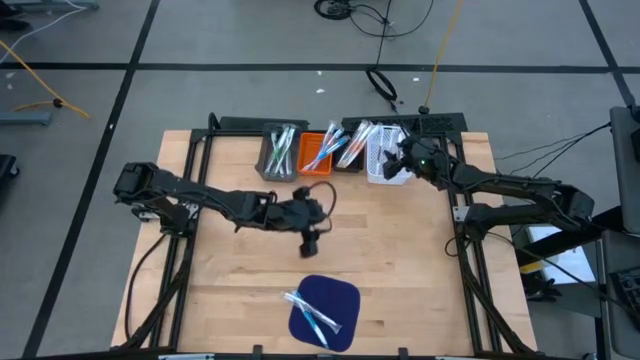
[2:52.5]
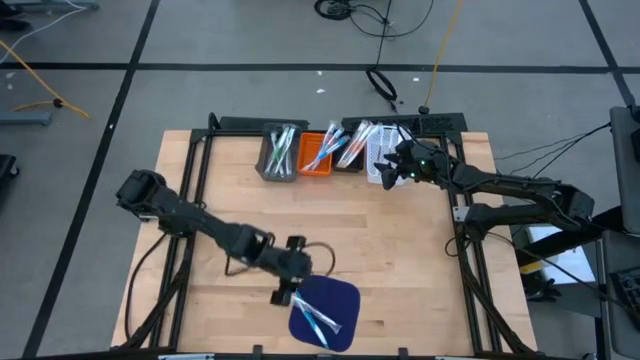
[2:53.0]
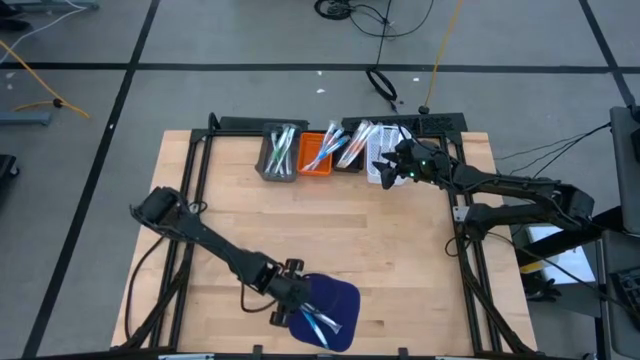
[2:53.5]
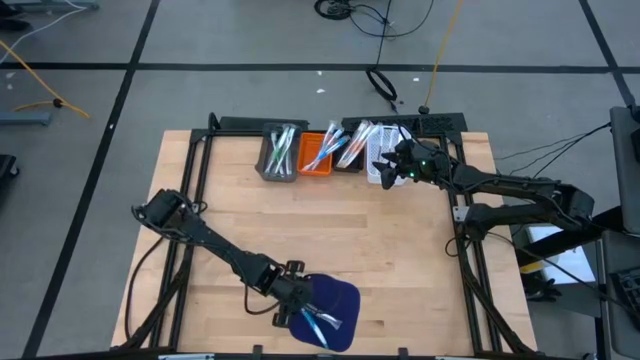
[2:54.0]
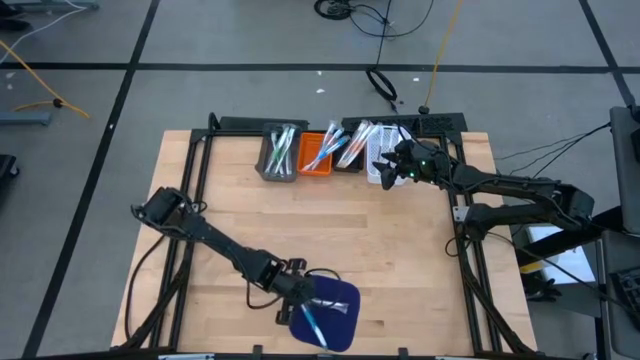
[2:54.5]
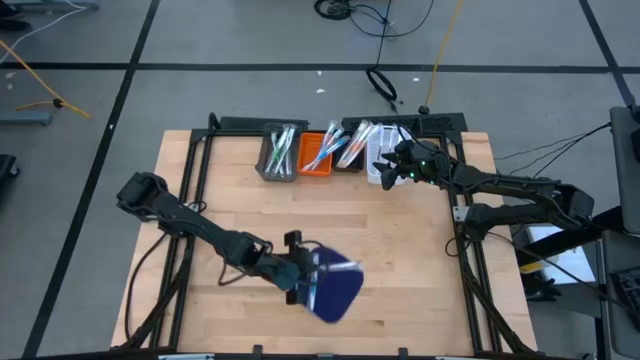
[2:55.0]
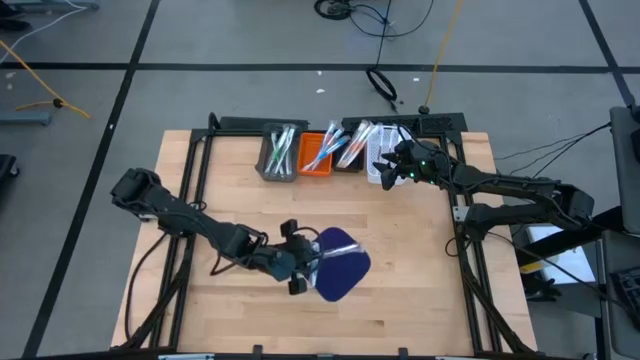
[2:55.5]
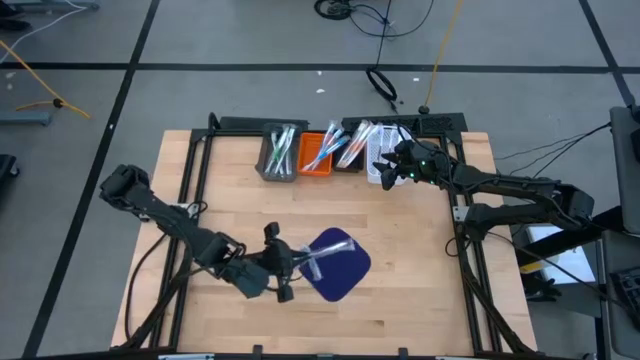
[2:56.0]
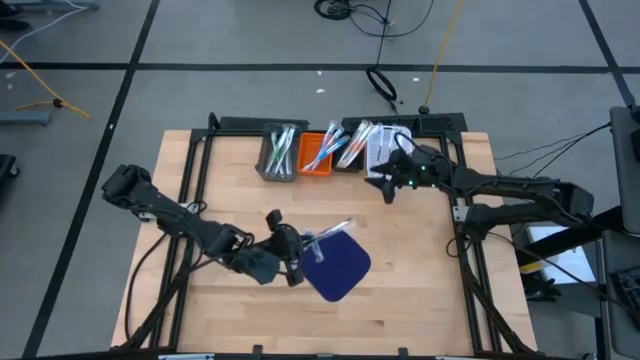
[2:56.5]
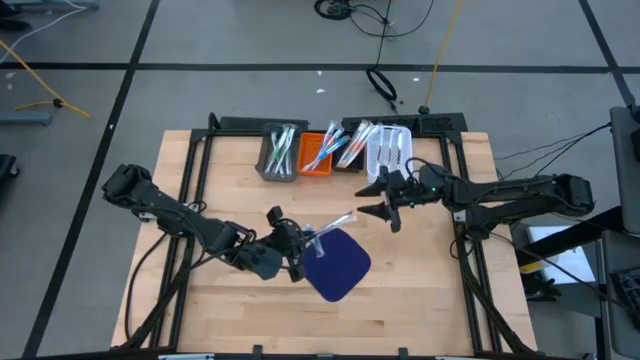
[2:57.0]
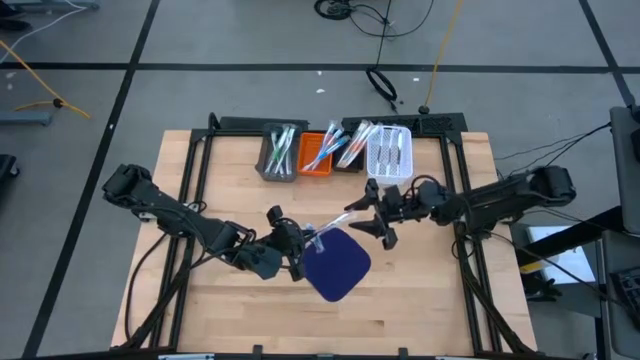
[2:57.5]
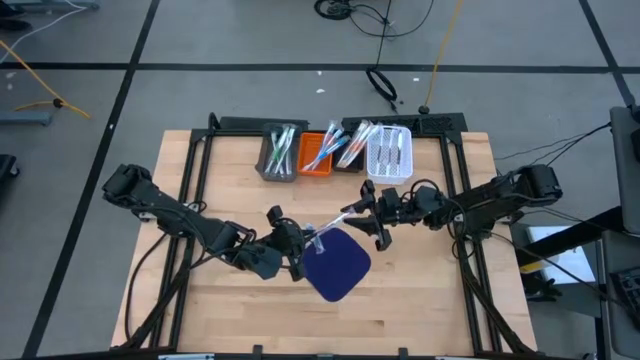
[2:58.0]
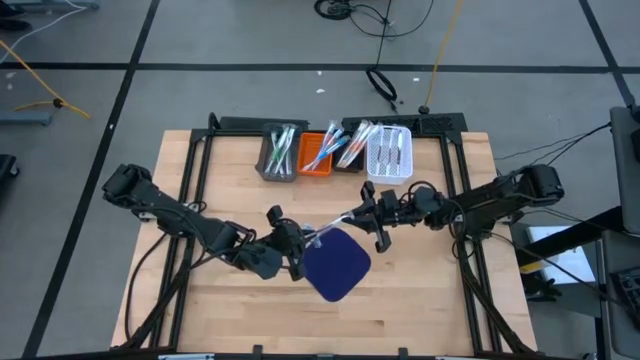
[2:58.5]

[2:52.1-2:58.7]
Task: Pick & Place Toothbrushes
Put the purple toothbrush into the white bin

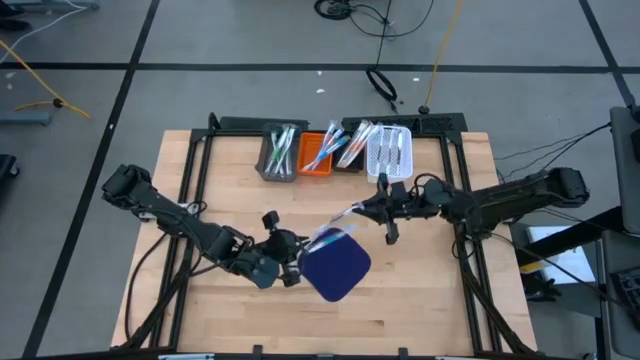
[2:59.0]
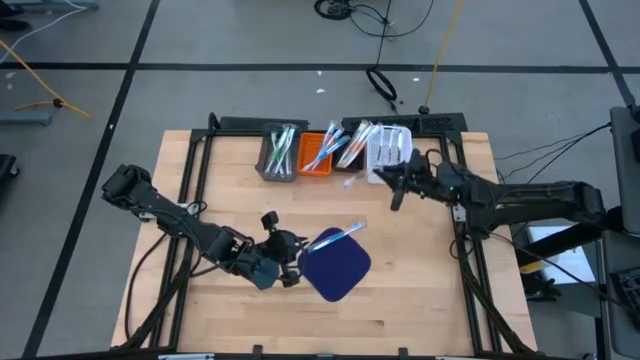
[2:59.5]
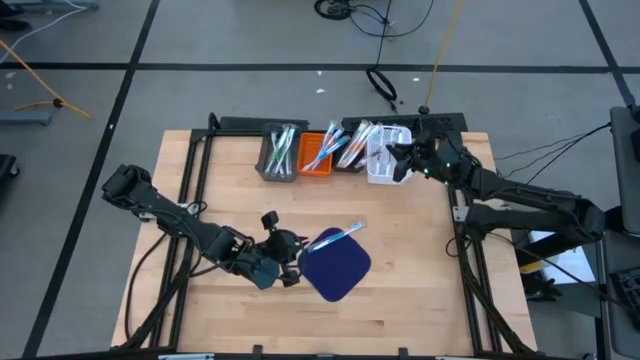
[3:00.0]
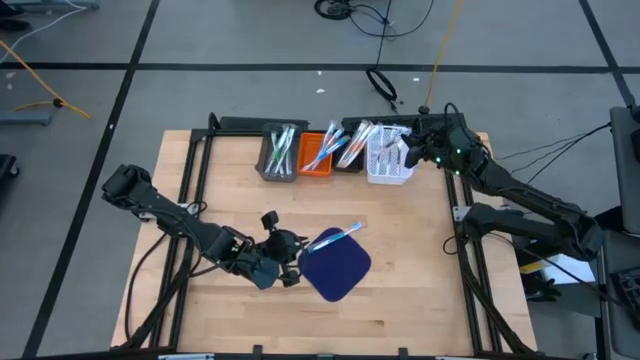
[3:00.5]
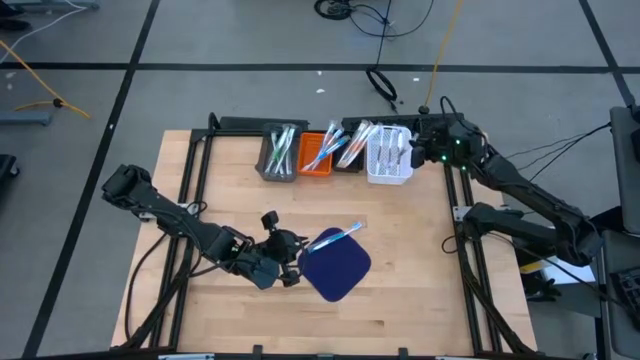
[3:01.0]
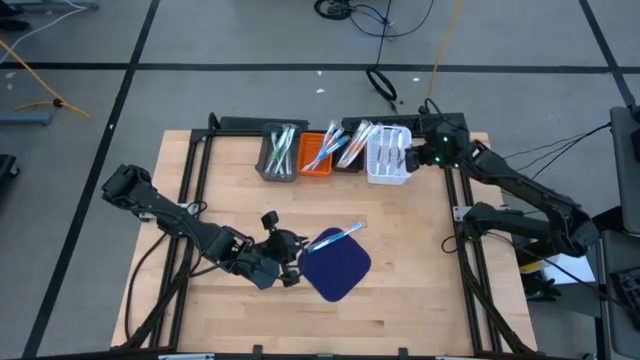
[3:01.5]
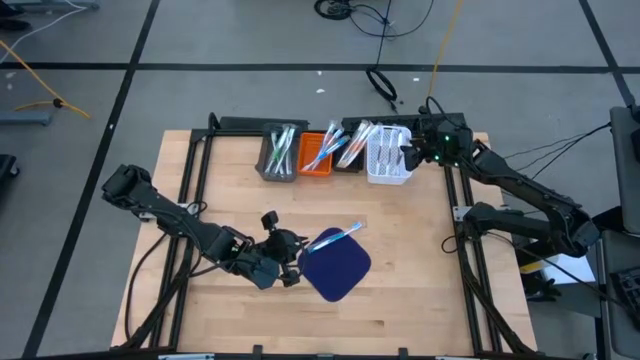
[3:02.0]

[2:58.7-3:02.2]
Put the purple toothbrush into the white bin

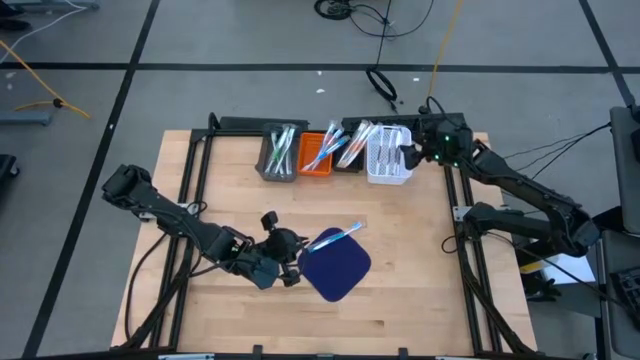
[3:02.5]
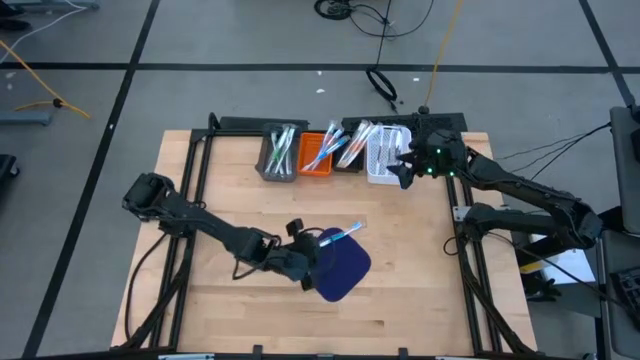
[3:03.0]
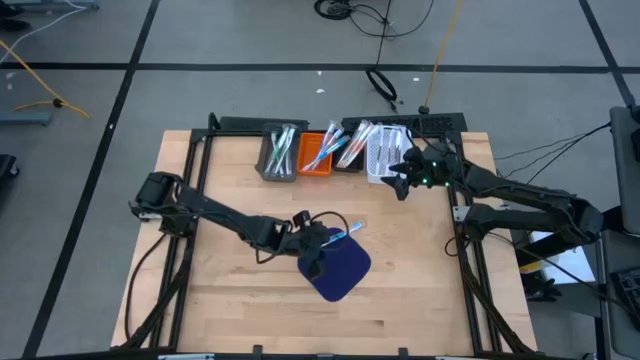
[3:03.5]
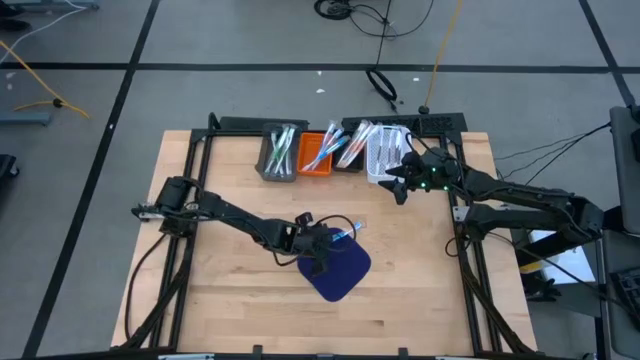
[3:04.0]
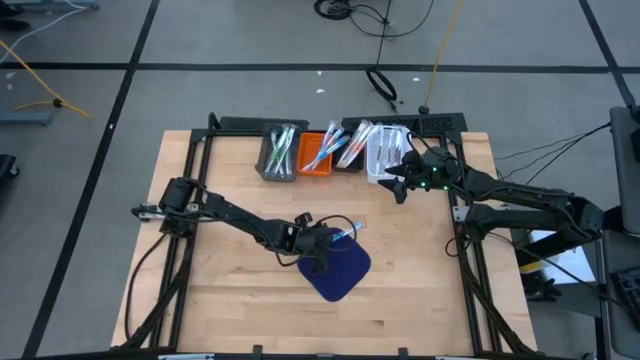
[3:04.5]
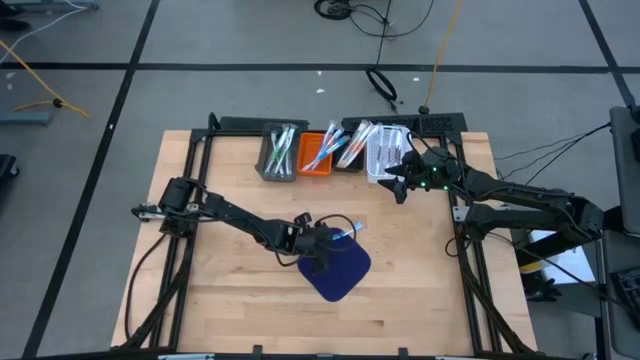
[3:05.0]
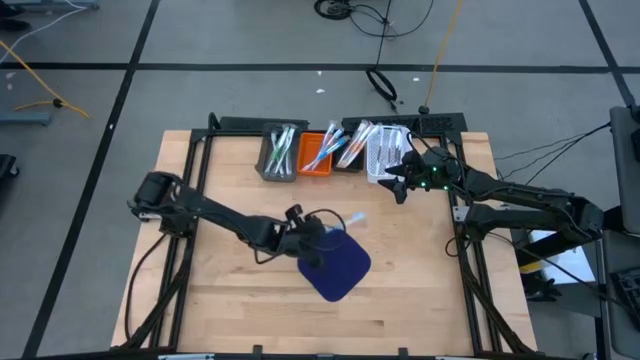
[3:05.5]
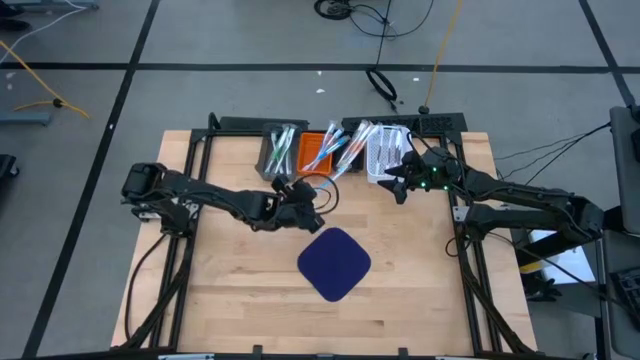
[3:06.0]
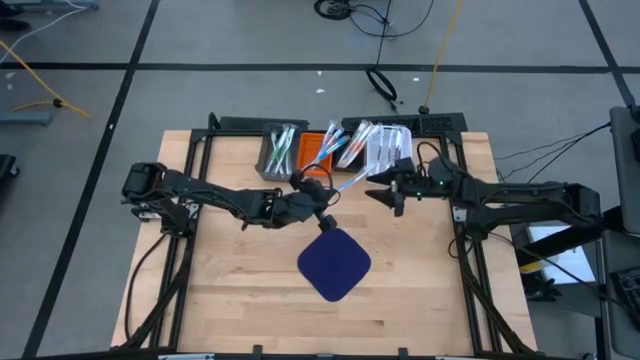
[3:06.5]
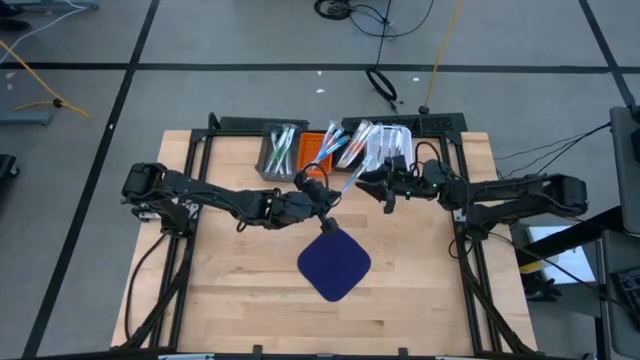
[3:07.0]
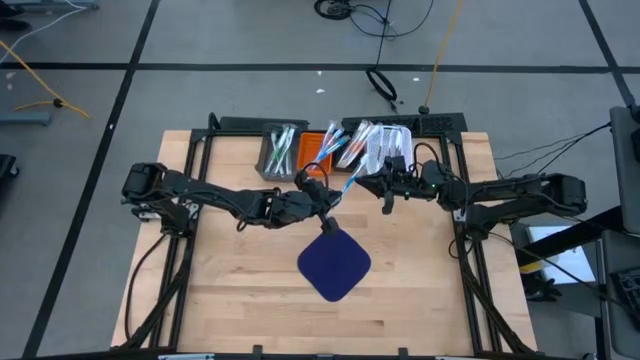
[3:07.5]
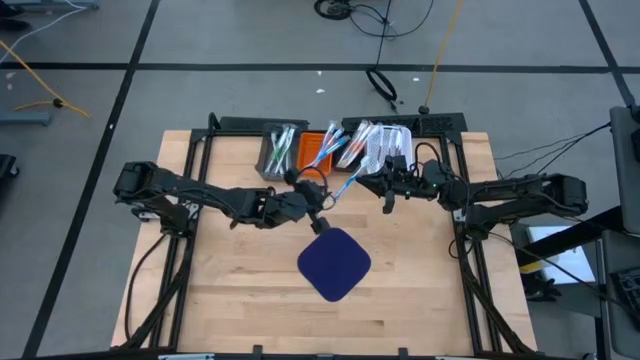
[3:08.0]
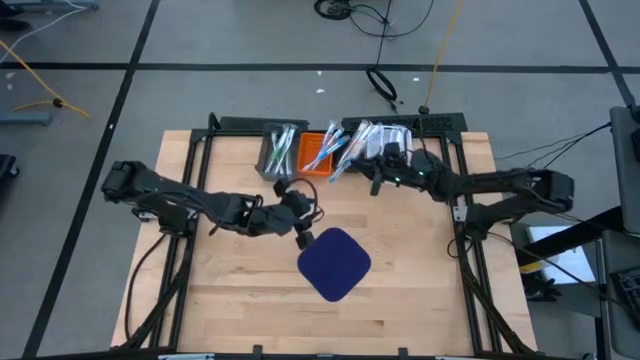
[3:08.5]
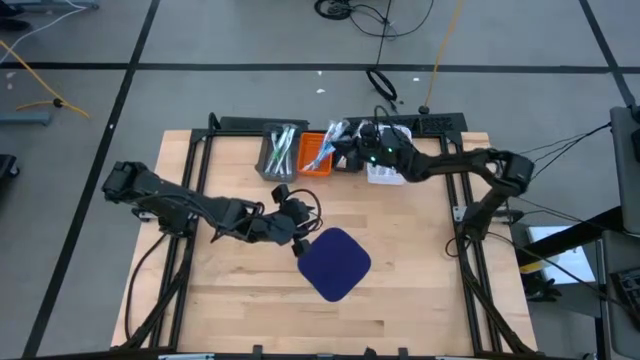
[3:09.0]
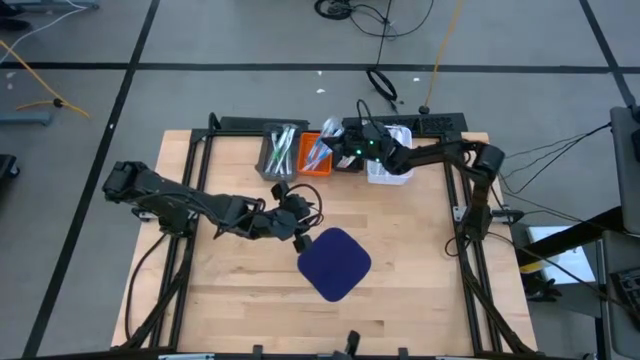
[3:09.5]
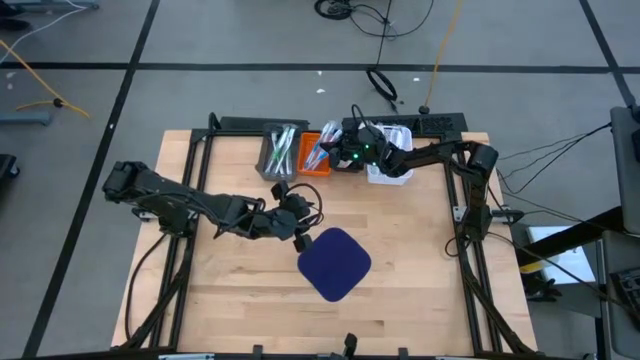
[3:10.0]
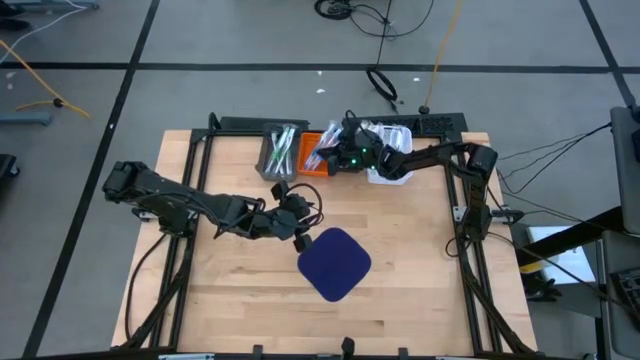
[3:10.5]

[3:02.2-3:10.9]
Put the blue toothbrush into the orange bin

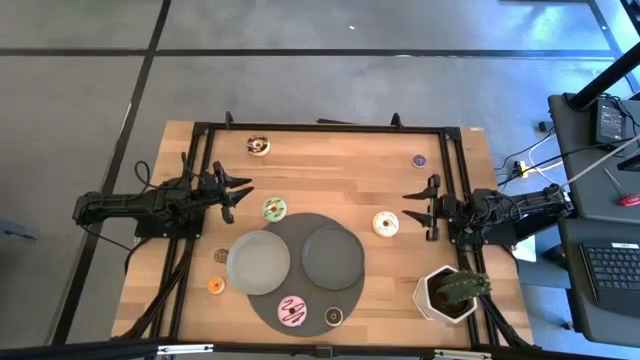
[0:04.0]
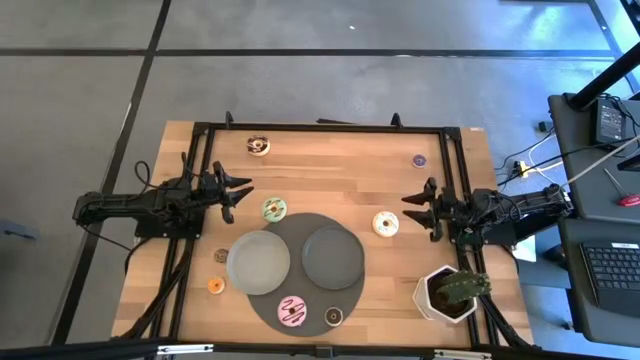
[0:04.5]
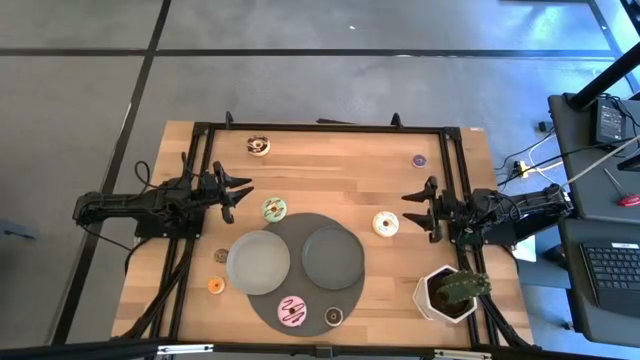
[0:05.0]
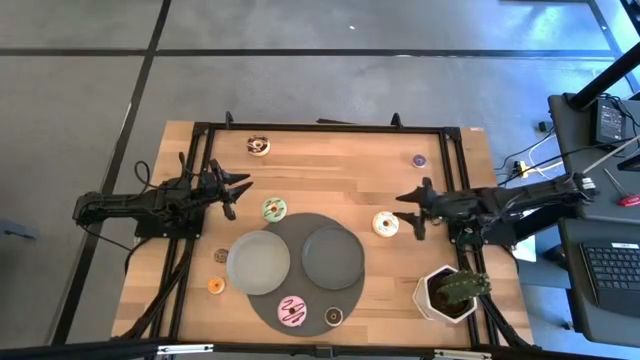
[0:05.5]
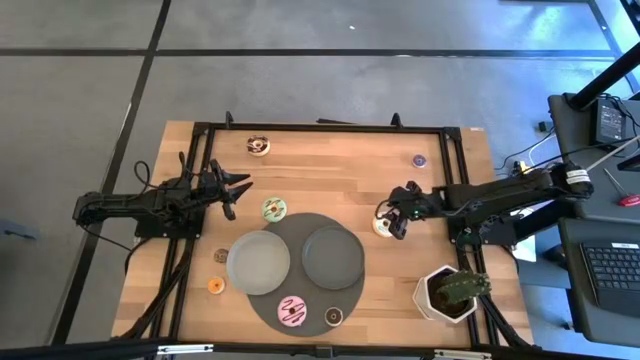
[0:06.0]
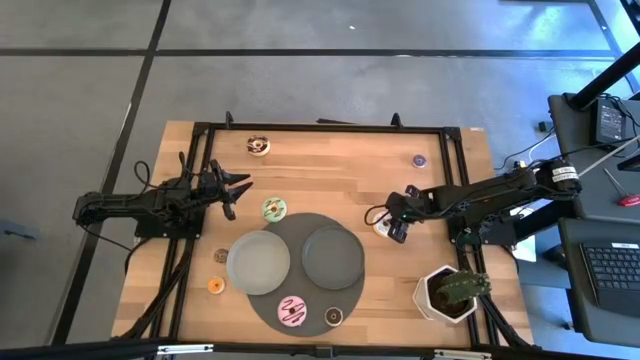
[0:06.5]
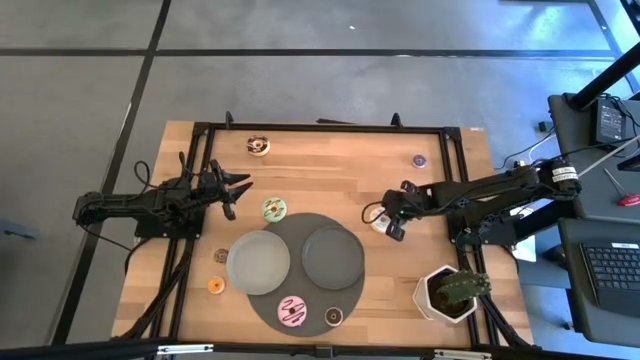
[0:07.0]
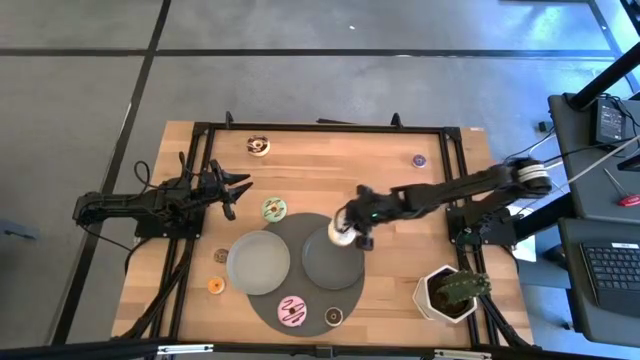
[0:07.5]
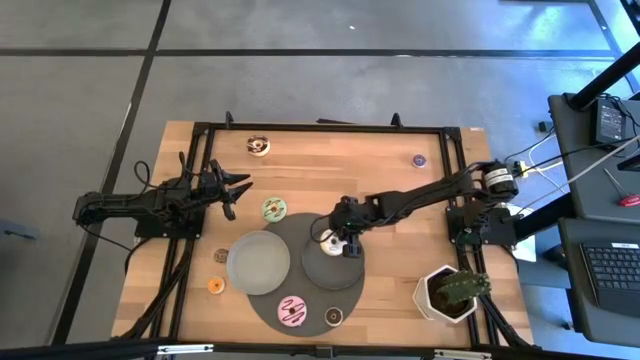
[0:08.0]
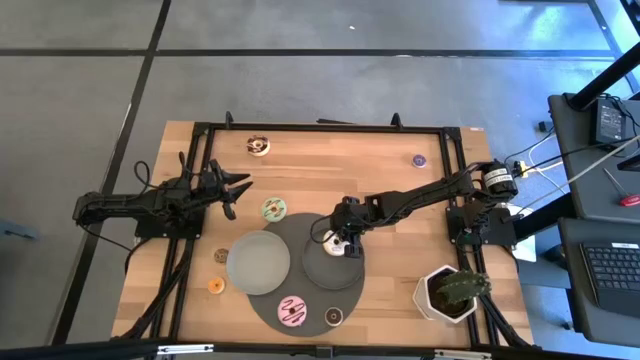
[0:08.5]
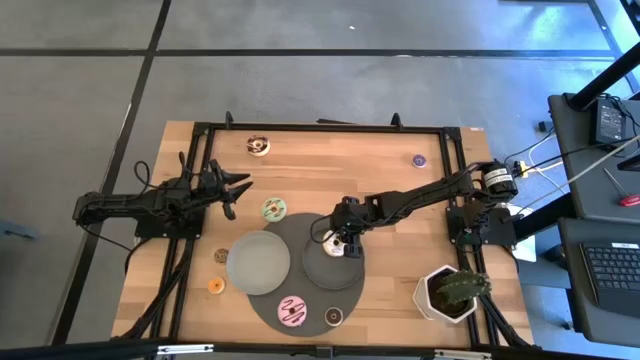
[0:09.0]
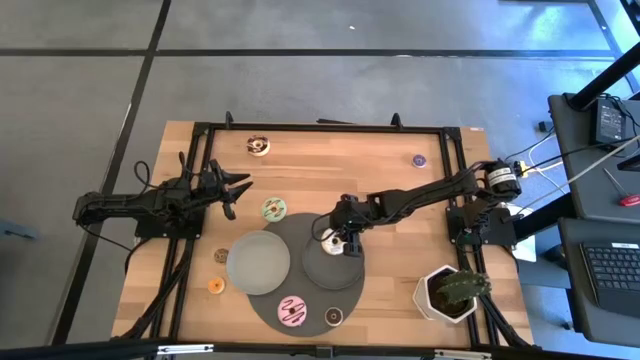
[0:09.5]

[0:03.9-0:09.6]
Task: Pick & Place donuts
Put the big white donut on the black plate
